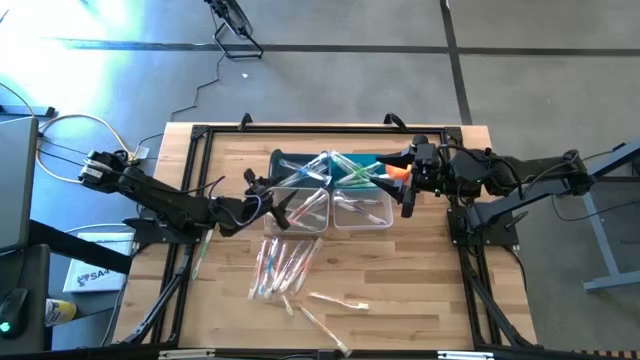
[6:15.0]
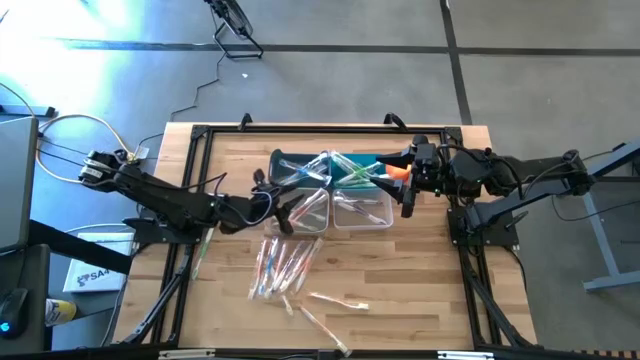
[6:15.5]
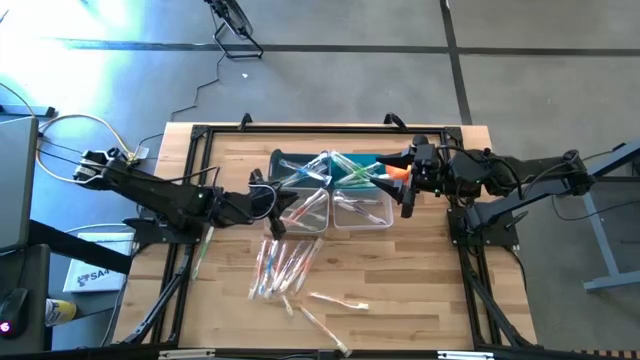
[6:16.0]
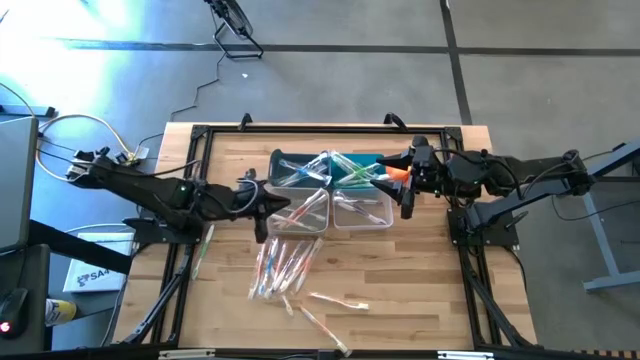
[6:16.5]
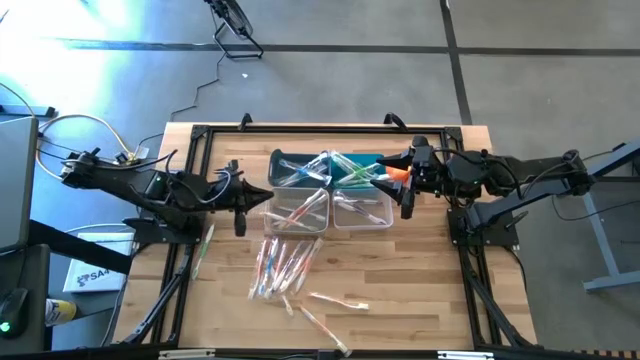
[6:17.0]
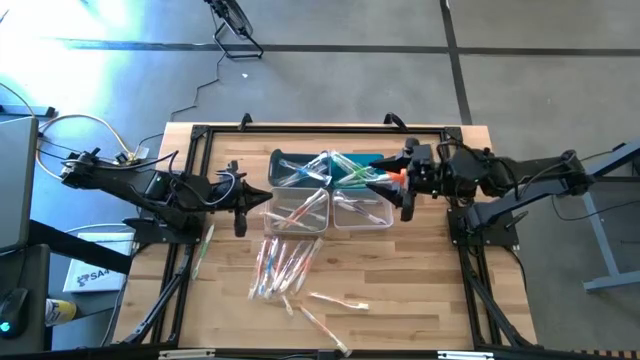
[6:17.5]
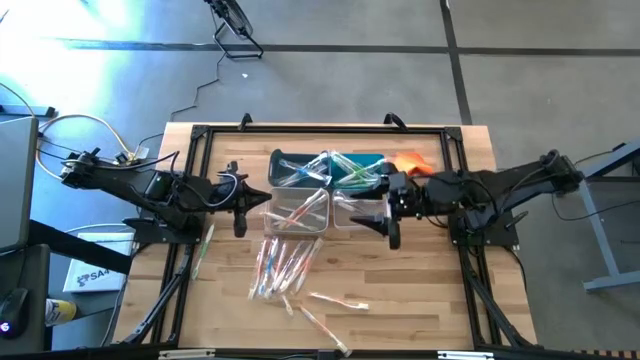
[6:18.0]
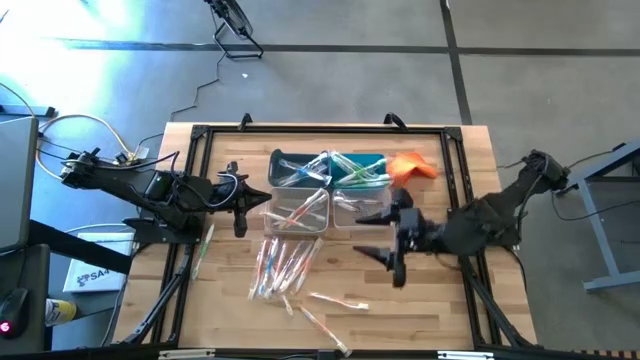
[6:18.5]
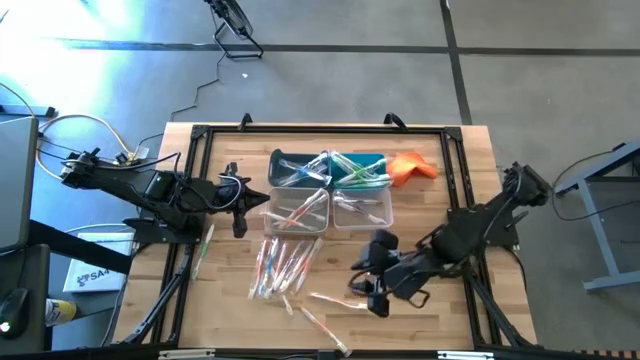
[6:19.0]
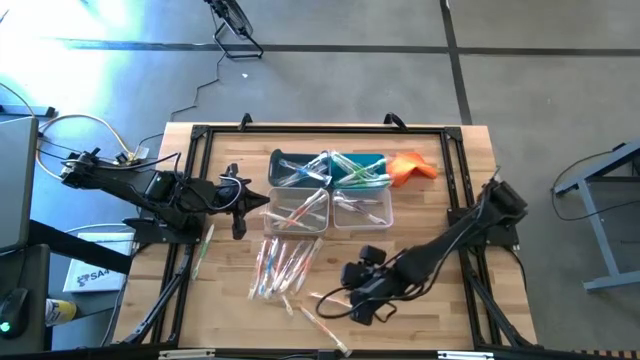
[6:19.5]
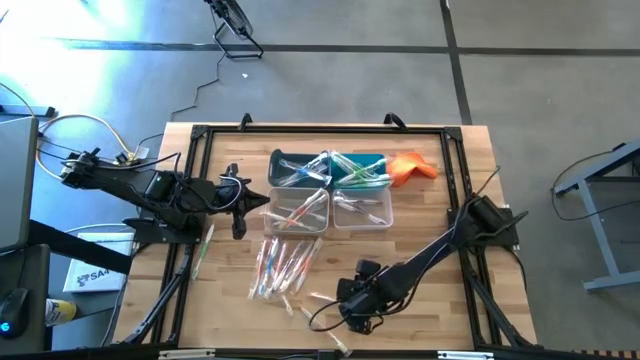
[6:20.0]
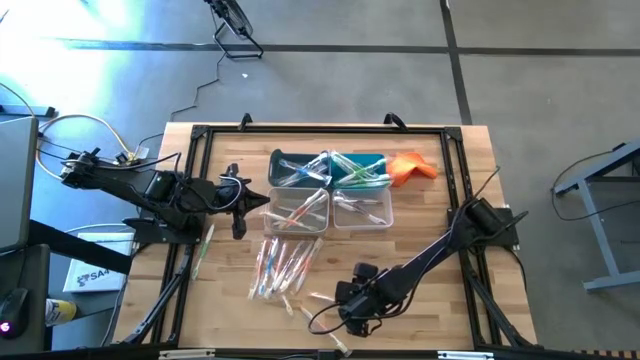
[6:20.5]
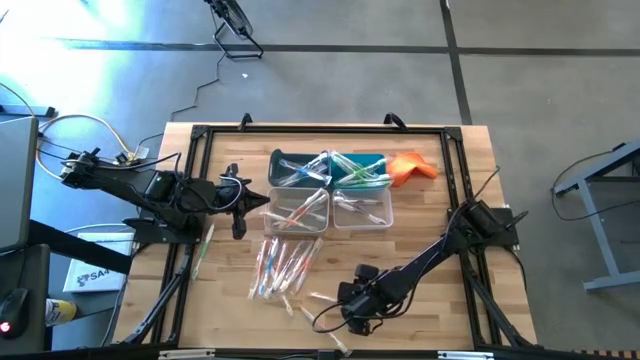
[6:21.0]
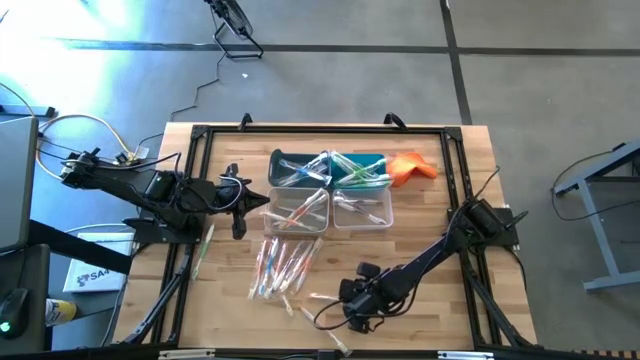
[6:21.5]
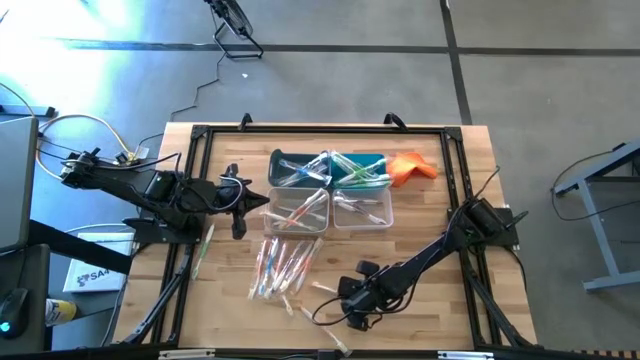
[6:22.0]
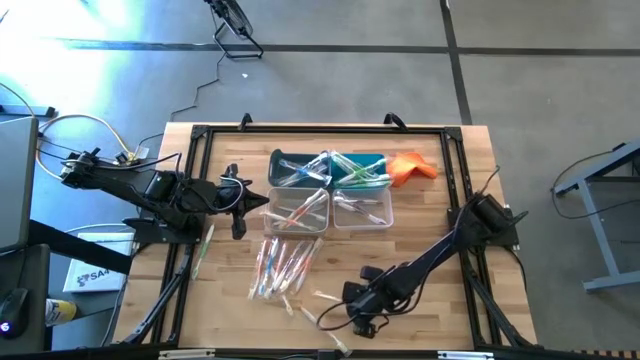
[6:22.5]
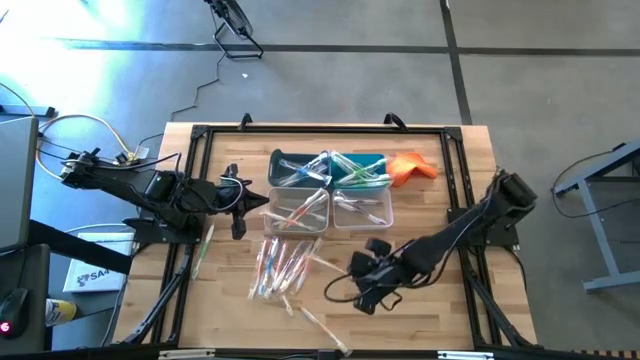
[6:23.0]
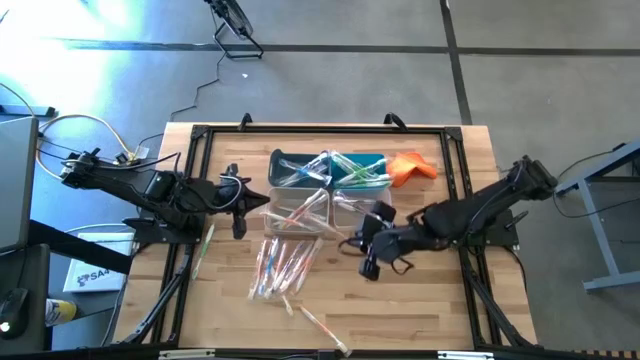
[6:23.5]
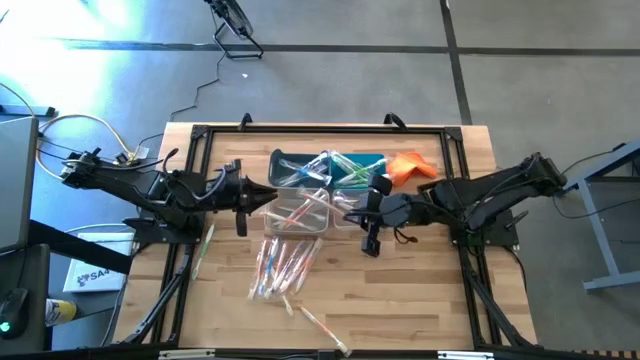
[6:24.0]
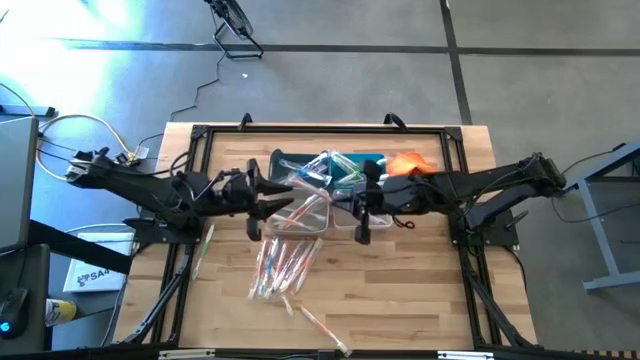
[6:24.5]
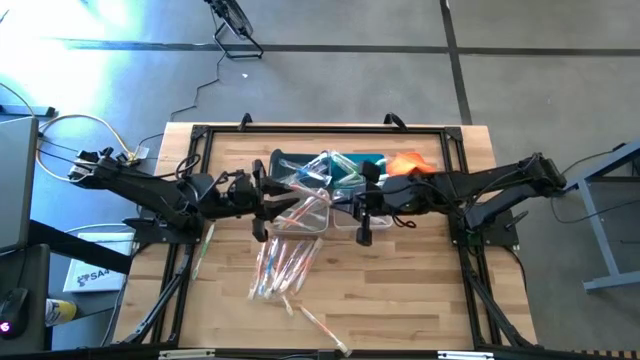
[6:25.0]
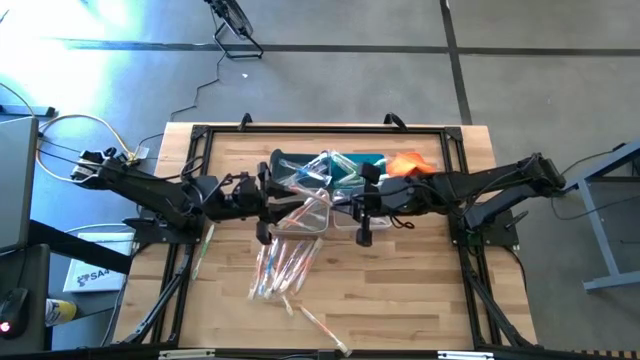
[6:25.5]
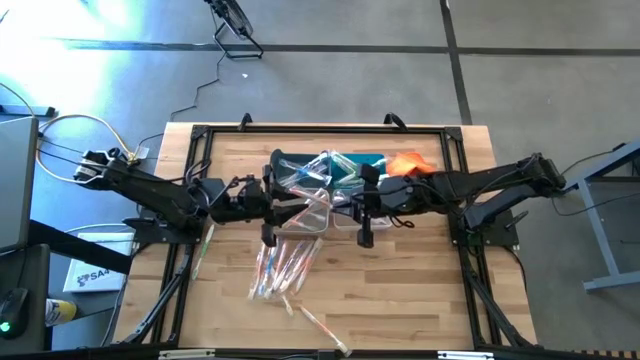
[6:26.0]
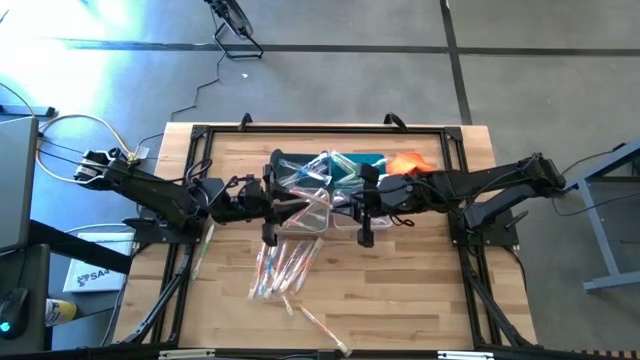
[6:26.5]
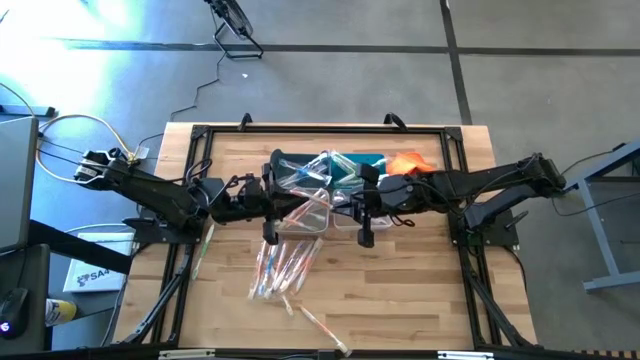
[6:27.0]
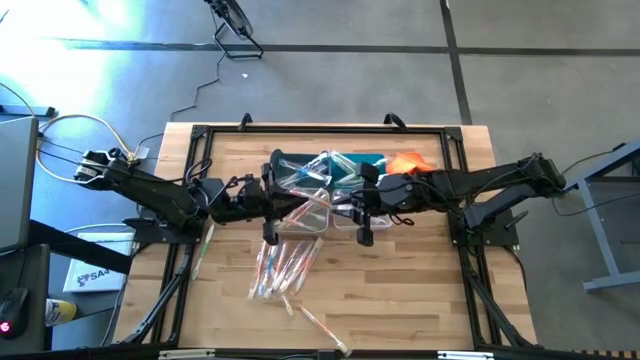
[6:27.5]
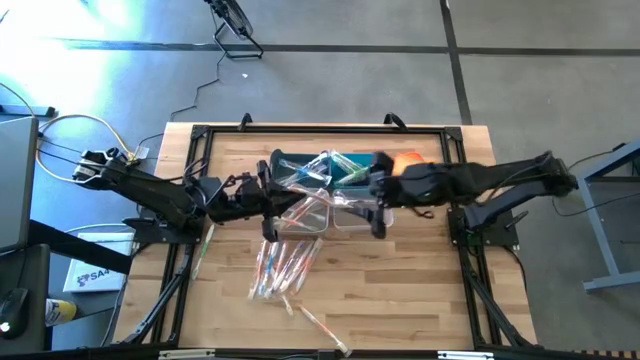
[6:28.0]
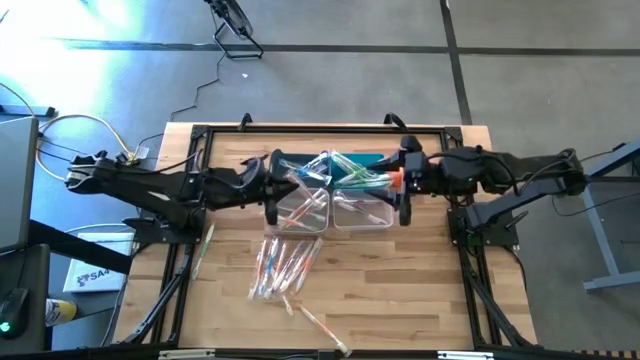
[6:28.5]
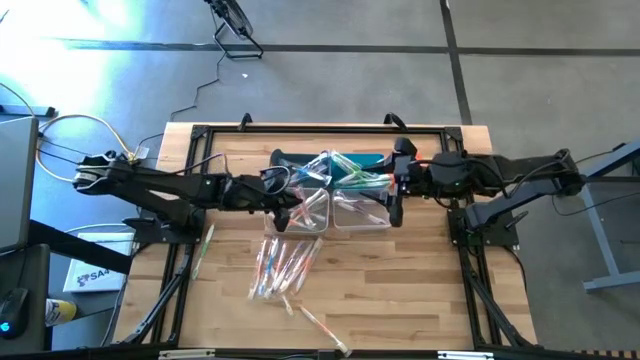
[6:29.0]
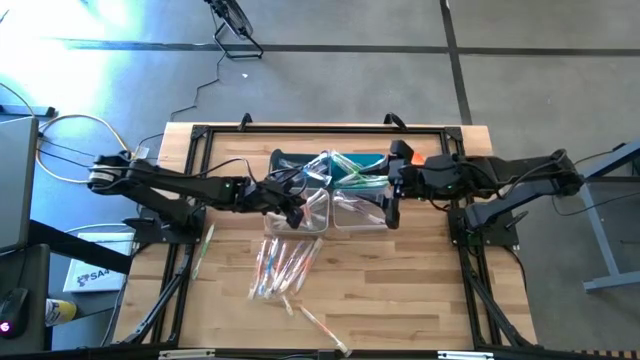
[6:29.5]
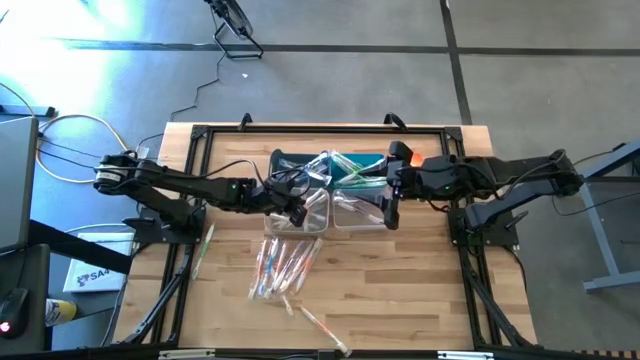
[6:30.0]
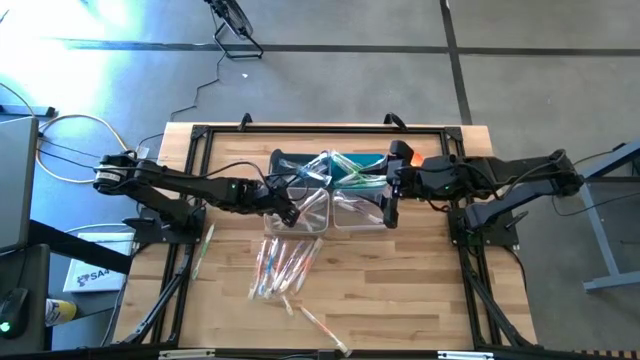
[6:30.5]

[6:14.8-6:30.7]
Task: Pick & Place Toothbrushes
Put the orange toothbrush into the gray bin

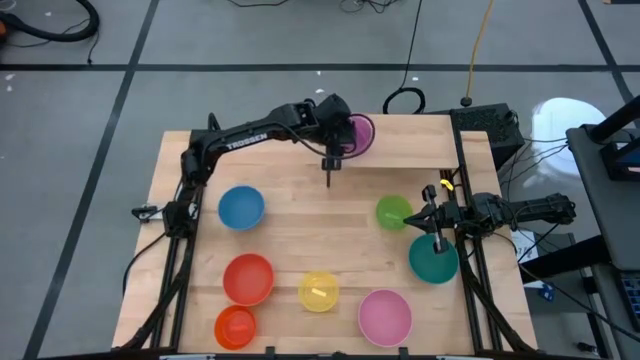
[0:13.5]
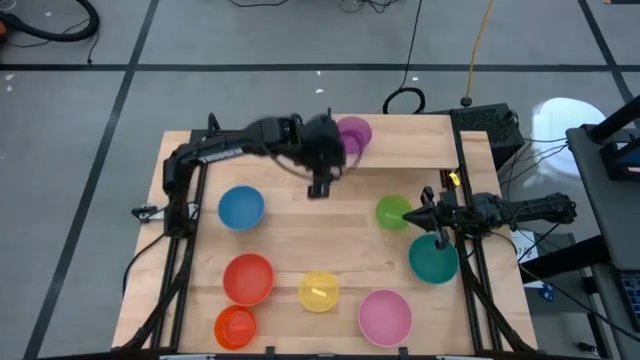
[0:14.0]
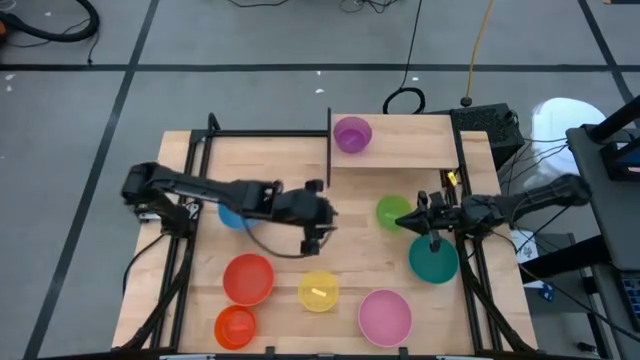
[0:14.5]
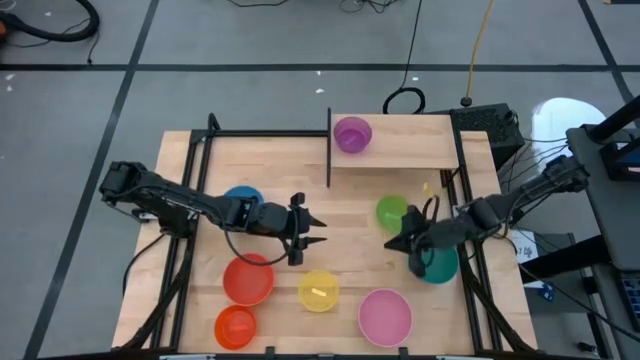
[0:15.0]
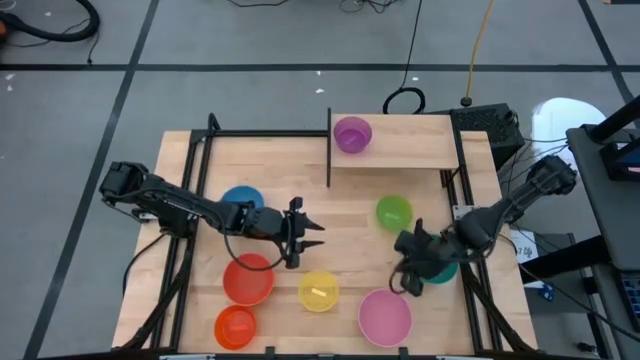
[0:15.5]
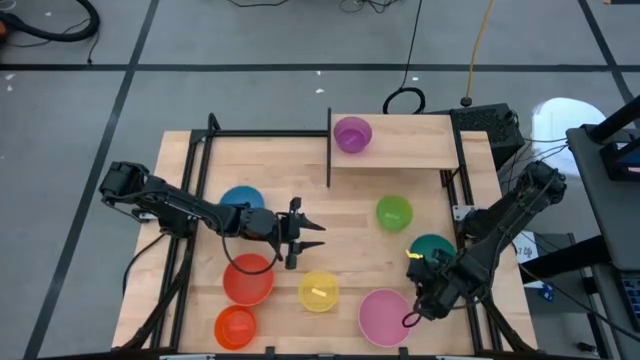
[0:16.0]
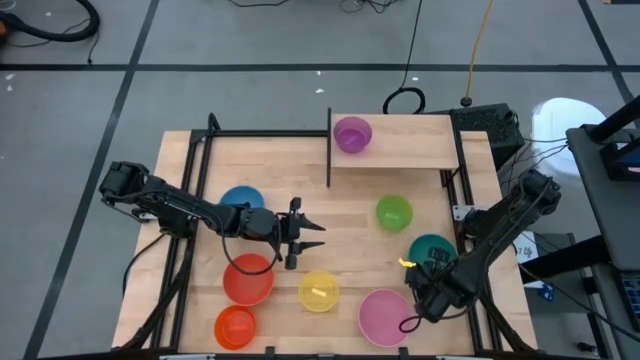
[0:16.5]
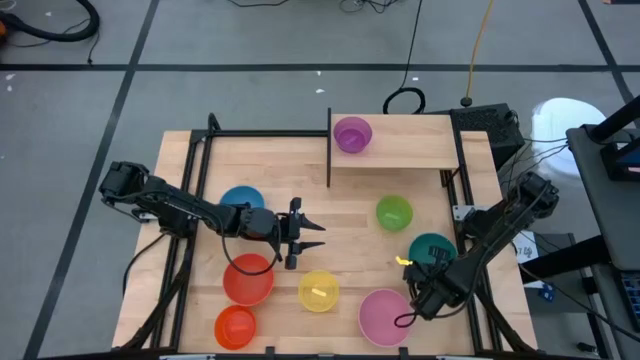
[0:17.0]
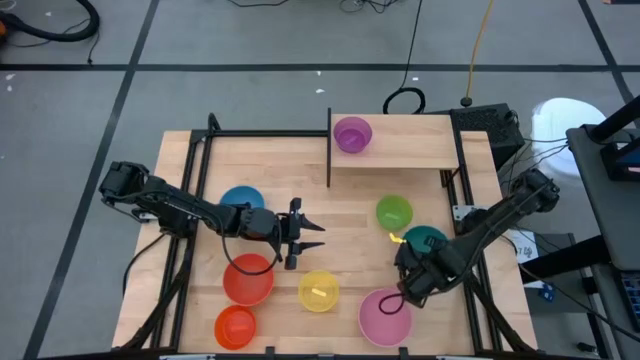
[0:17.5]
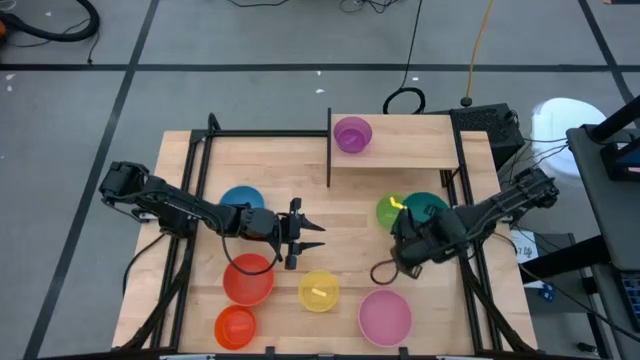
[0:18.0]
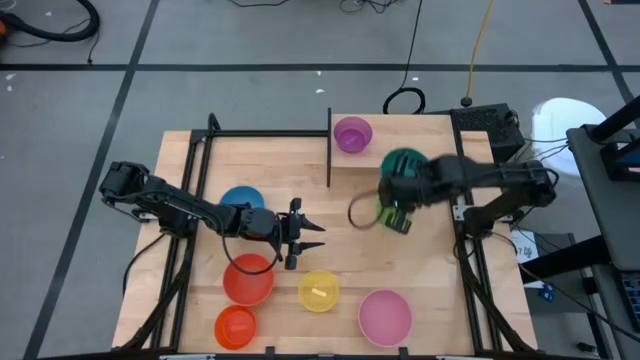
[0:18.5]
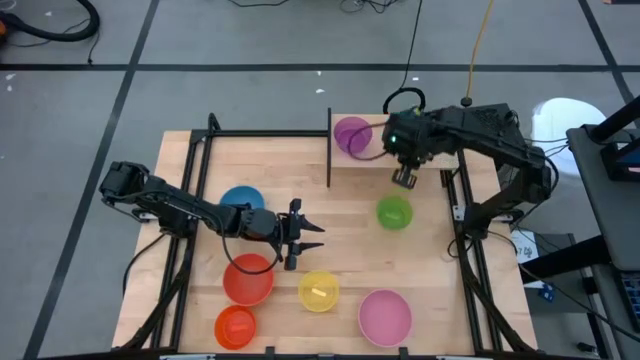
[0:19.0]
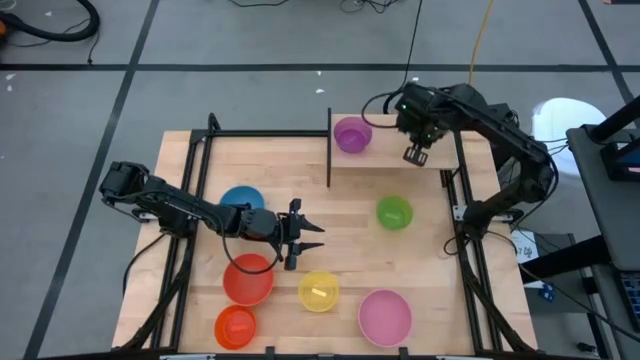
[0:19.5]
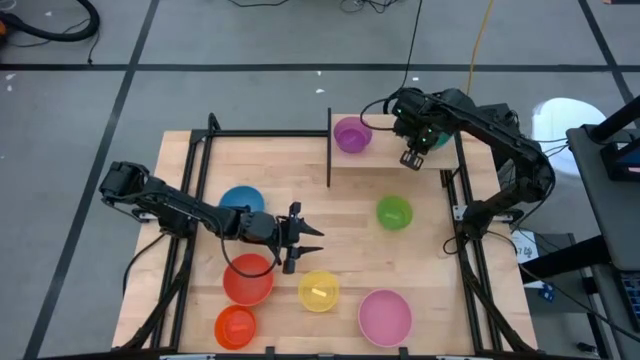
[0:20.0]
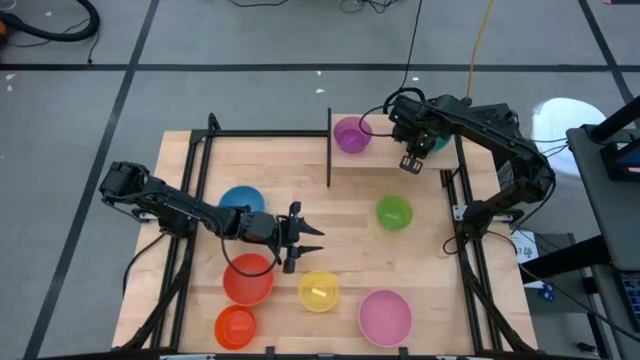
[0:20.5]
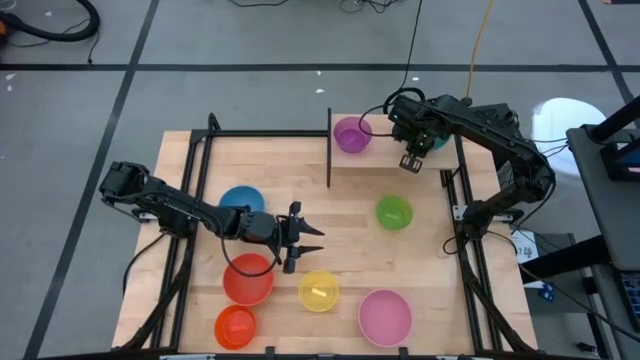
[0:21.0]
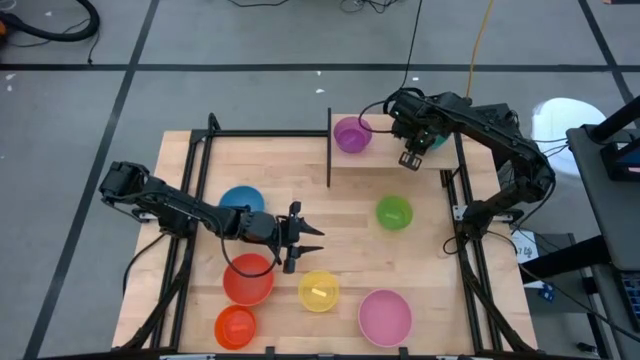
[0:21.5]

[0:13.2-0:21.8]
Task: Place and stack bowls onto a shelf
Put the large green bowl on the shelf
